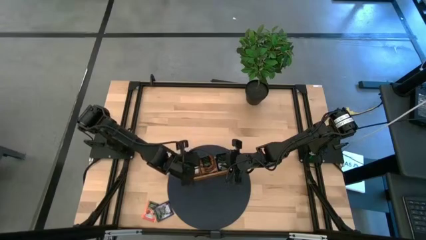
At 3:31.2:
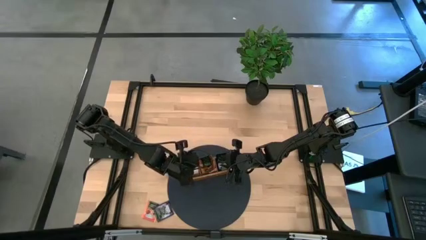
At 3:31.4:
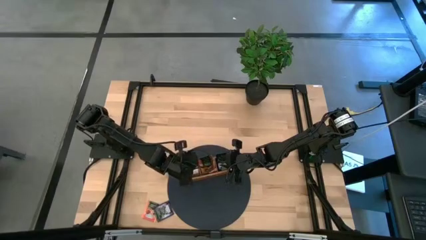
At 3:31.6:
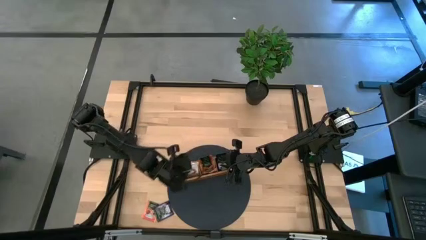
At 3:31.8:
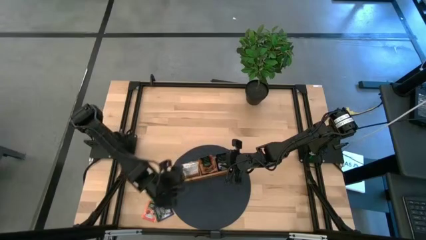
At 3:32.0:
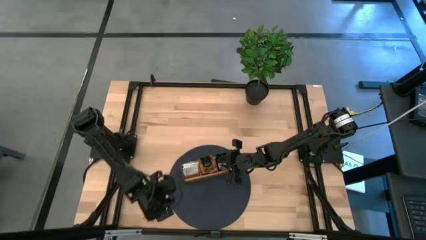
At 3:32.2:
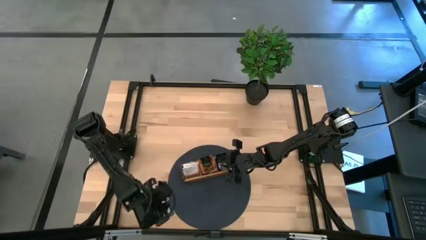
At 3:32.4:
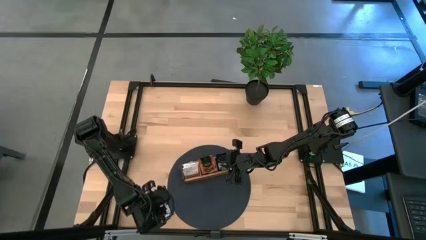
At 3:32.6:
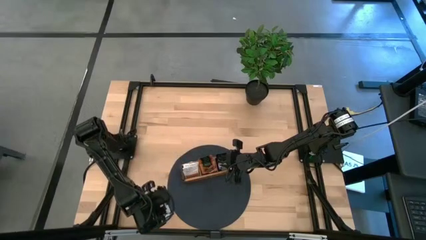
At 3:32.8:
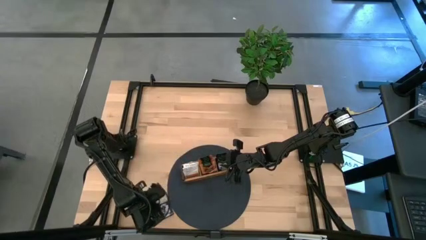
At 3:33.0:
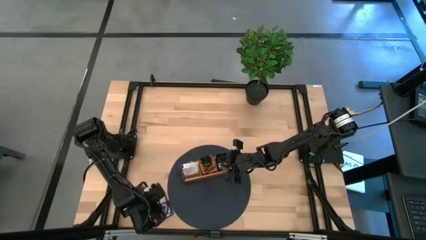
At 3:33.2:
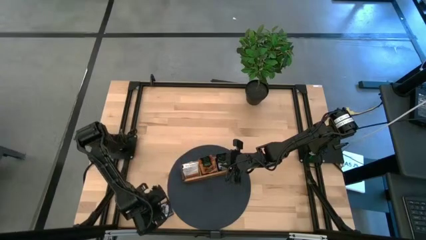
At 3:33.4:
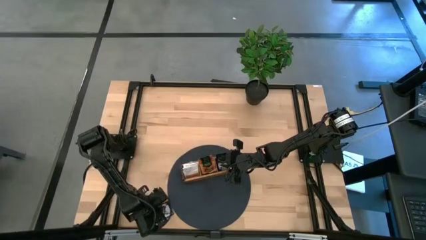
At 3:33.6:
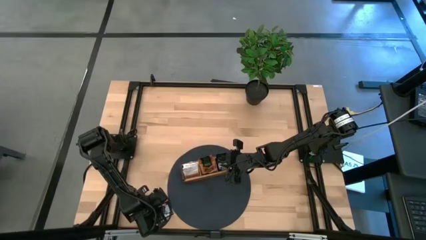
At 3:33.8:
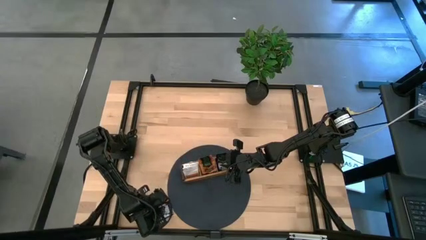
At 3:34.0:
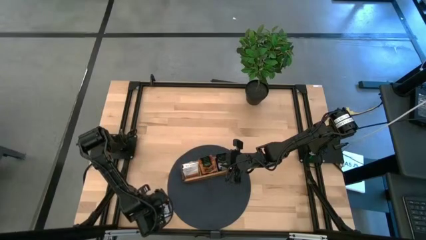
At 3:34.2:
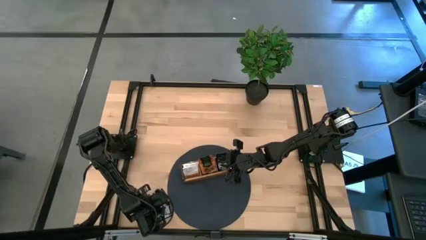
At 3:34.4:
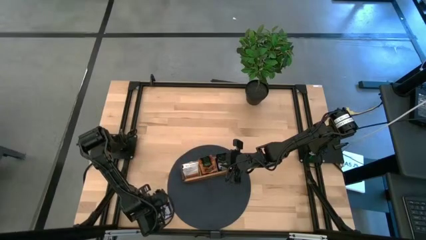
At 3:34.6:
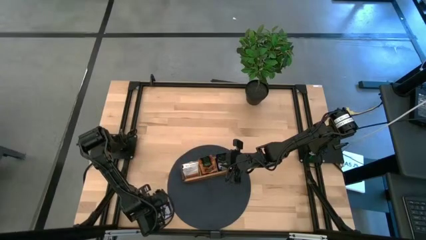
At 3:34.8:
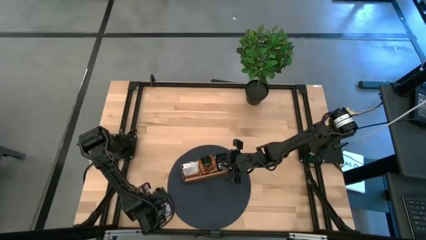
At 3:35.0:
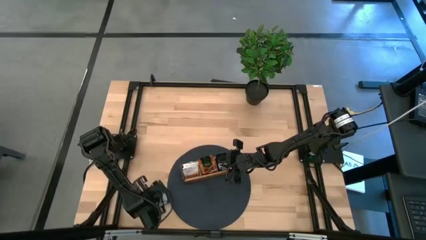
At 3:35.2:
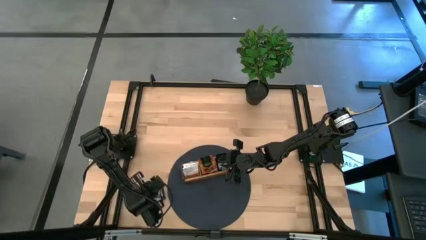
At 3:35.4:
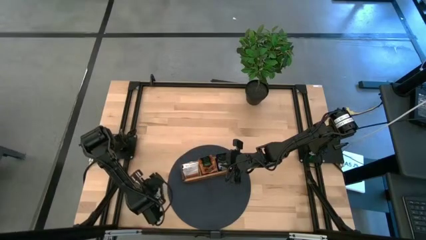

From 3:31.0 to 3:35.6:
Task: Pick & Place Tea
Put the black white tea bag into the right section of the wooden organizer

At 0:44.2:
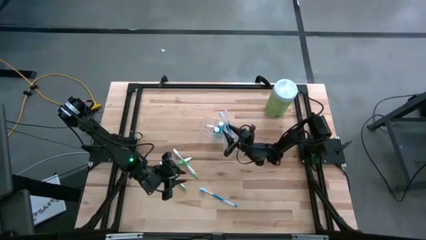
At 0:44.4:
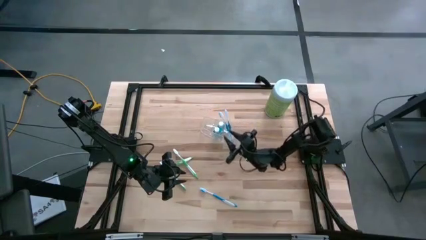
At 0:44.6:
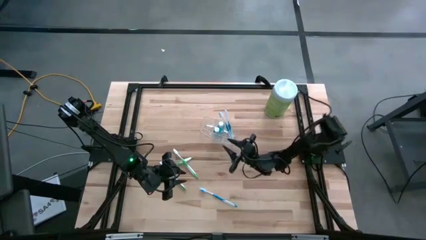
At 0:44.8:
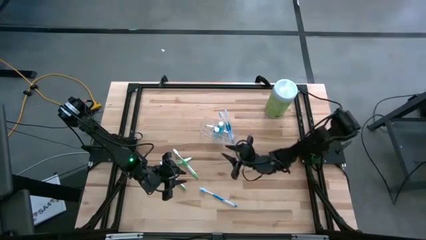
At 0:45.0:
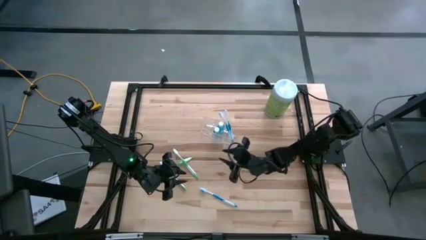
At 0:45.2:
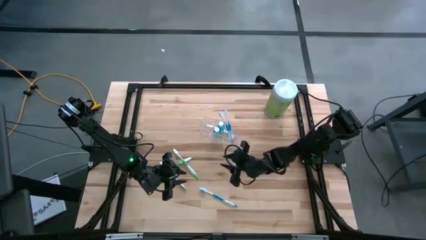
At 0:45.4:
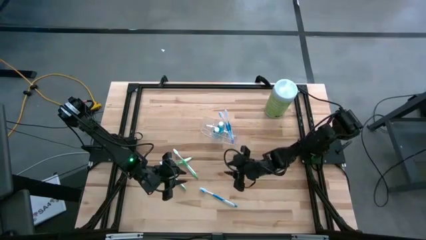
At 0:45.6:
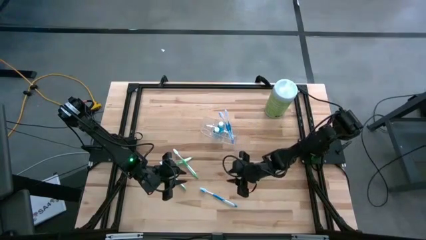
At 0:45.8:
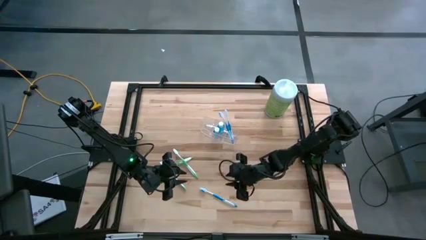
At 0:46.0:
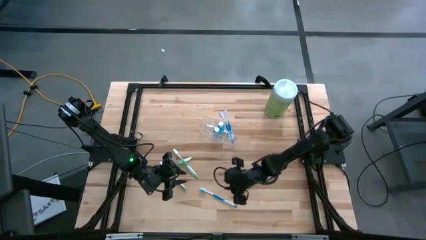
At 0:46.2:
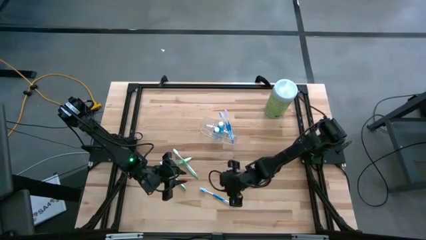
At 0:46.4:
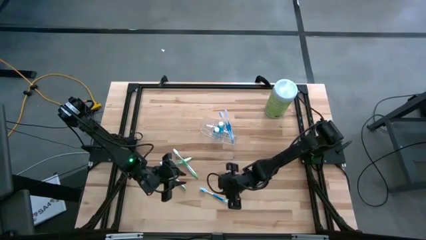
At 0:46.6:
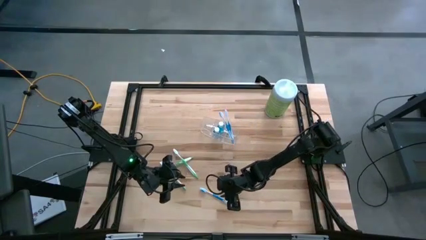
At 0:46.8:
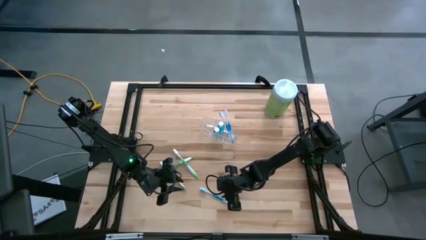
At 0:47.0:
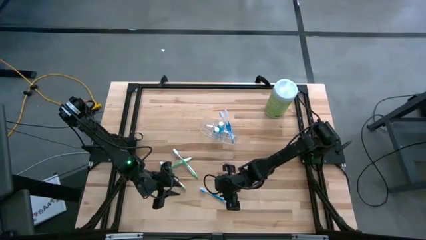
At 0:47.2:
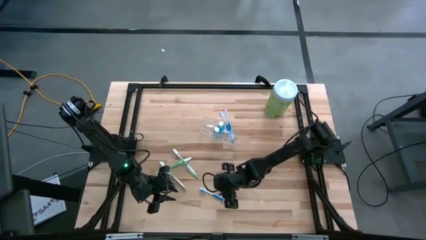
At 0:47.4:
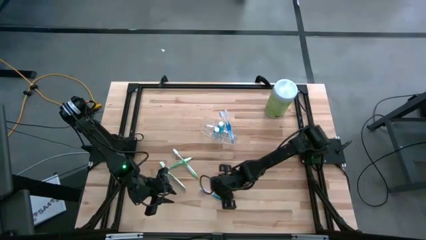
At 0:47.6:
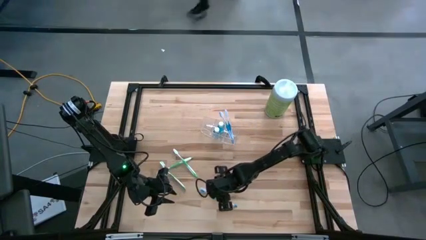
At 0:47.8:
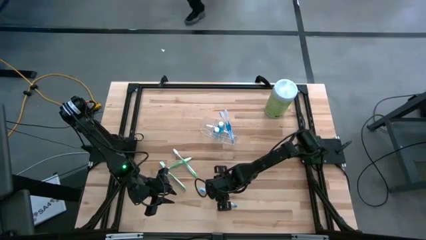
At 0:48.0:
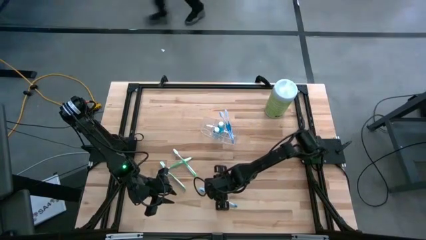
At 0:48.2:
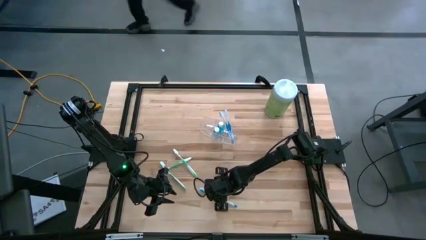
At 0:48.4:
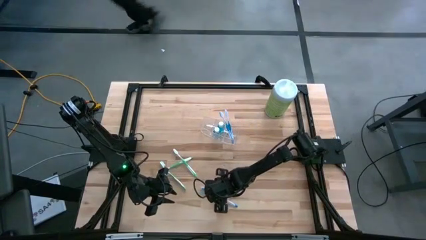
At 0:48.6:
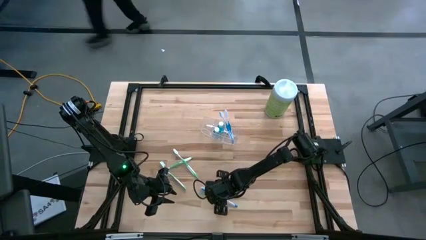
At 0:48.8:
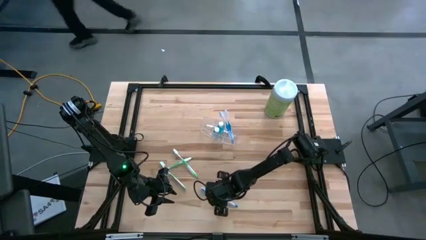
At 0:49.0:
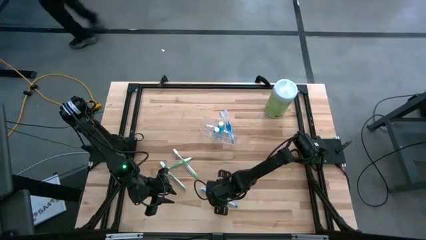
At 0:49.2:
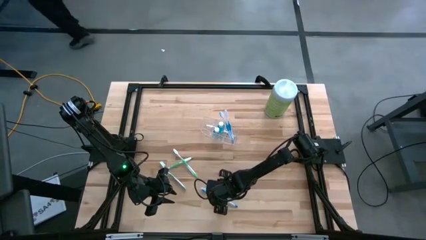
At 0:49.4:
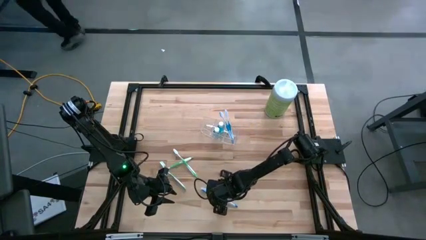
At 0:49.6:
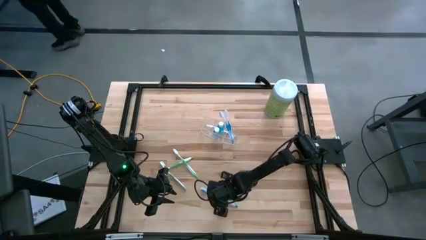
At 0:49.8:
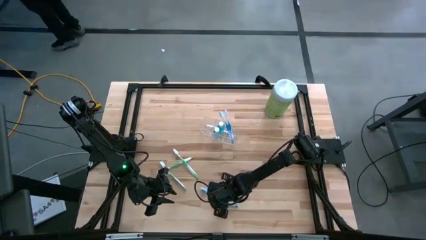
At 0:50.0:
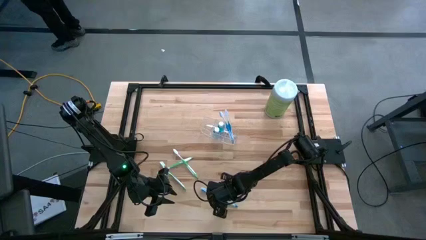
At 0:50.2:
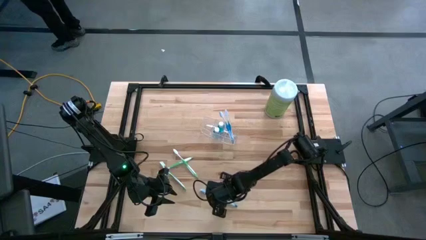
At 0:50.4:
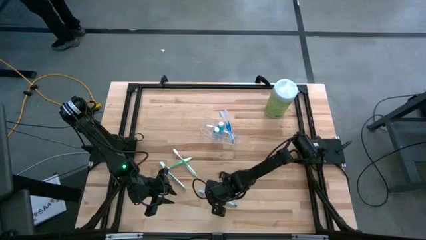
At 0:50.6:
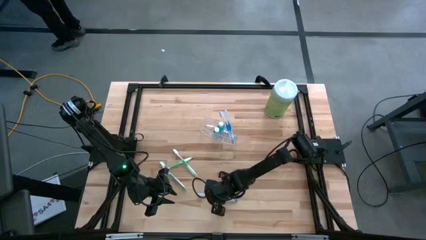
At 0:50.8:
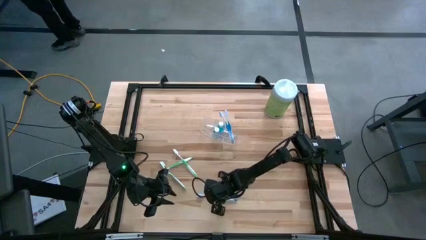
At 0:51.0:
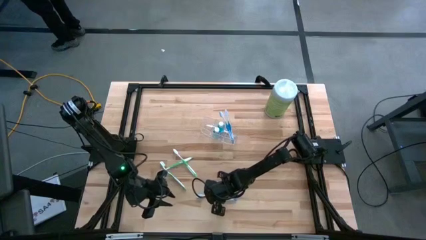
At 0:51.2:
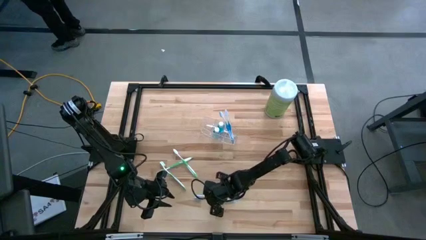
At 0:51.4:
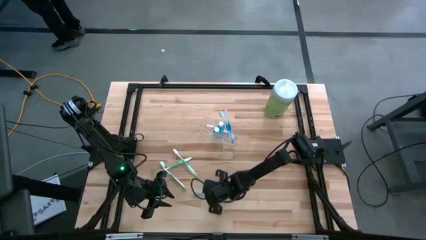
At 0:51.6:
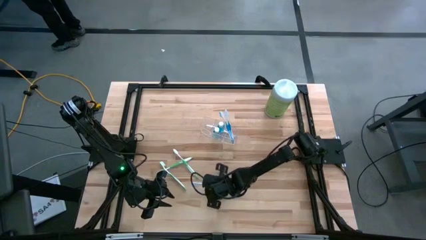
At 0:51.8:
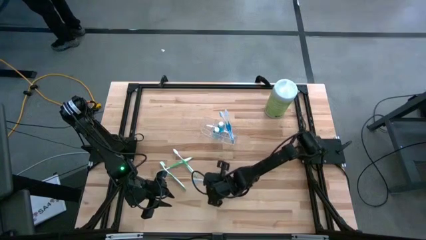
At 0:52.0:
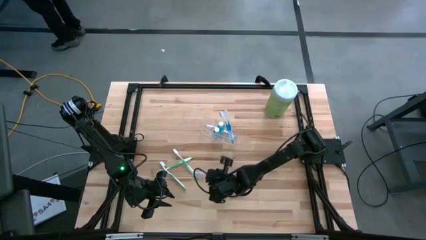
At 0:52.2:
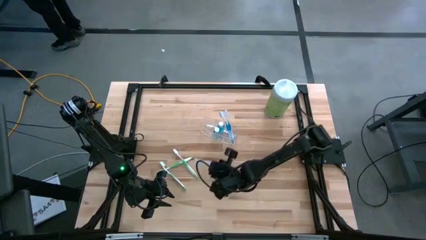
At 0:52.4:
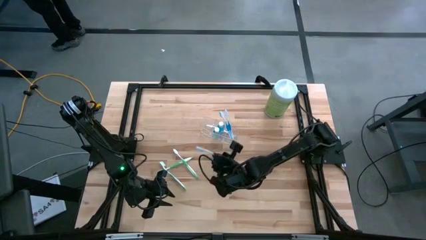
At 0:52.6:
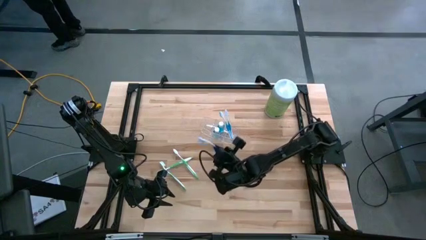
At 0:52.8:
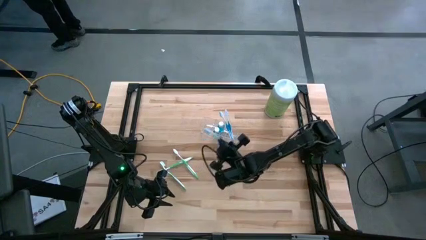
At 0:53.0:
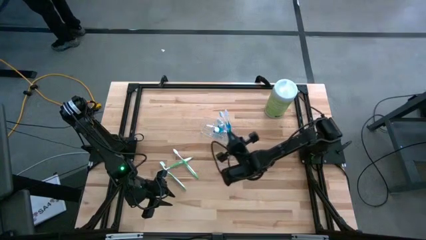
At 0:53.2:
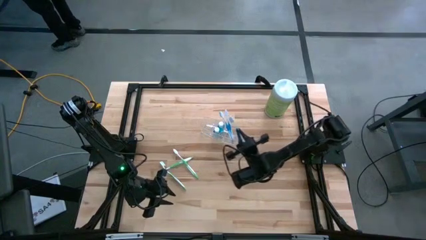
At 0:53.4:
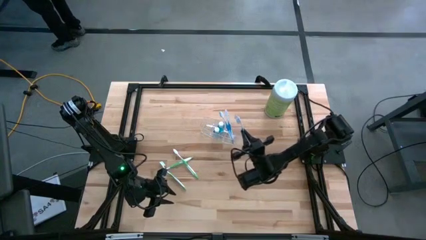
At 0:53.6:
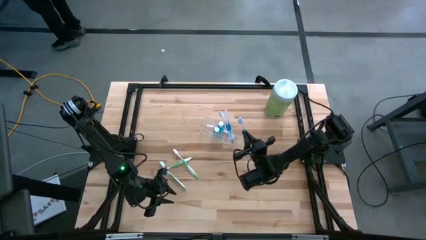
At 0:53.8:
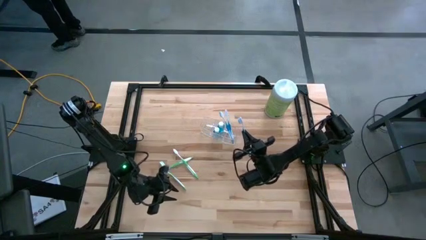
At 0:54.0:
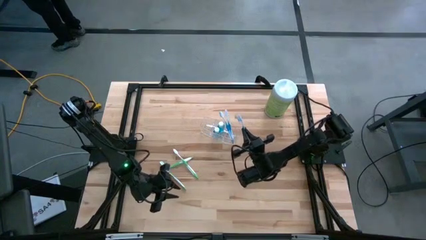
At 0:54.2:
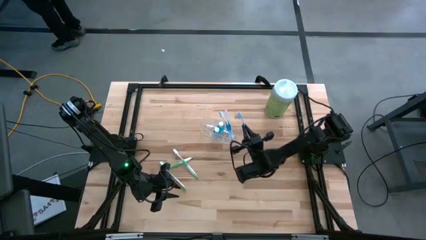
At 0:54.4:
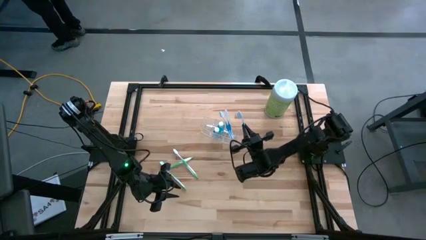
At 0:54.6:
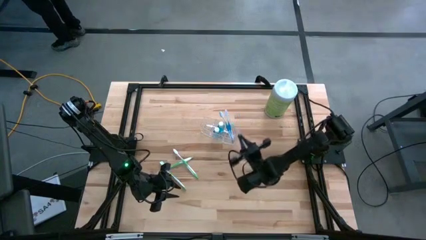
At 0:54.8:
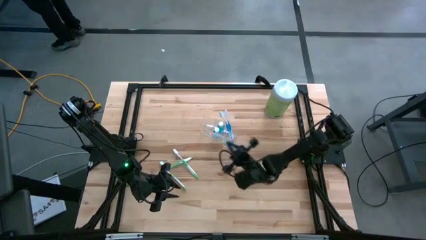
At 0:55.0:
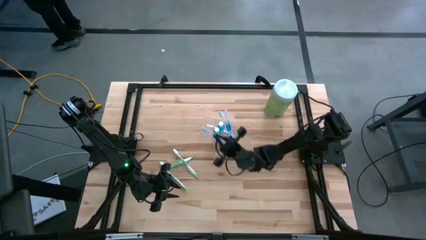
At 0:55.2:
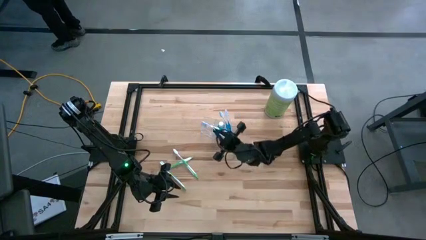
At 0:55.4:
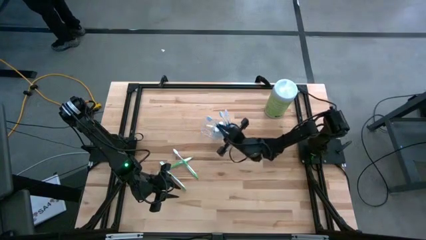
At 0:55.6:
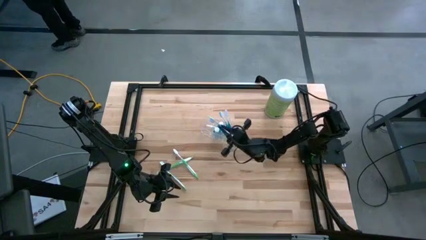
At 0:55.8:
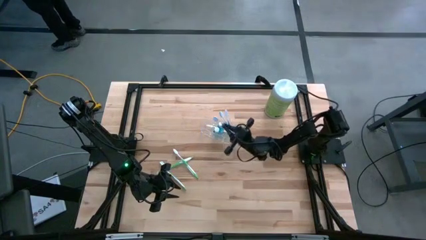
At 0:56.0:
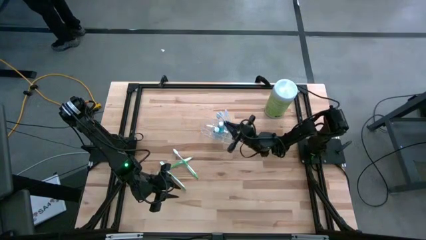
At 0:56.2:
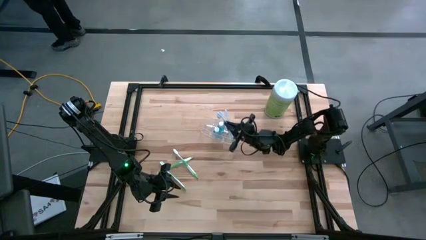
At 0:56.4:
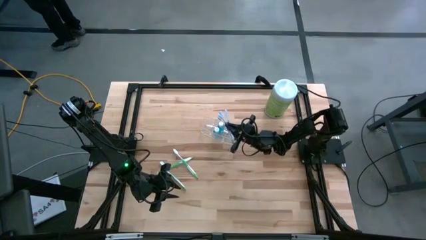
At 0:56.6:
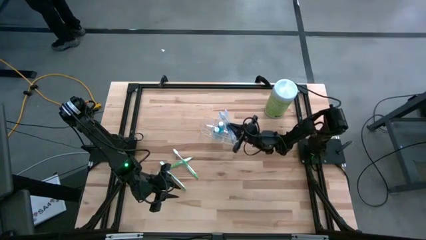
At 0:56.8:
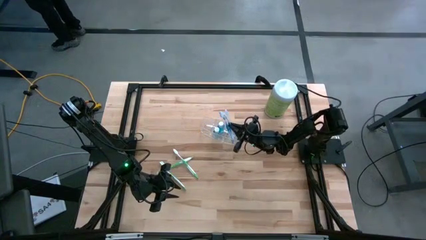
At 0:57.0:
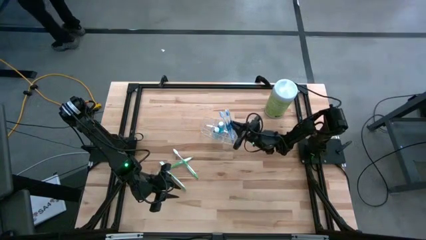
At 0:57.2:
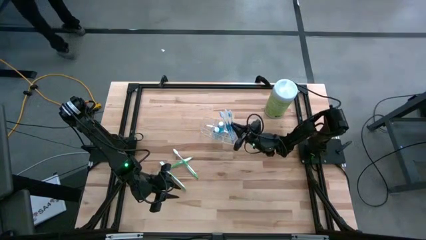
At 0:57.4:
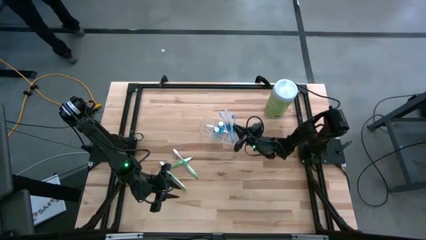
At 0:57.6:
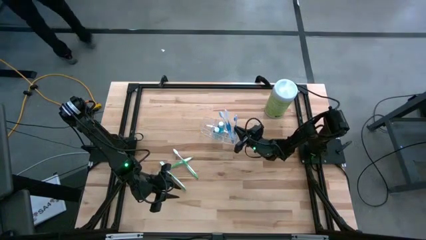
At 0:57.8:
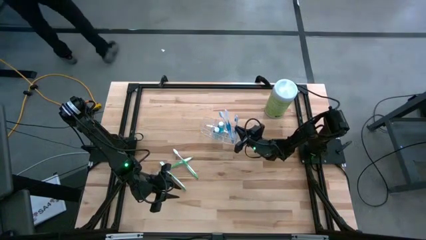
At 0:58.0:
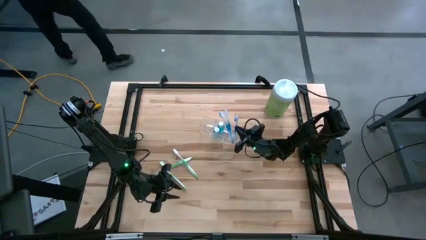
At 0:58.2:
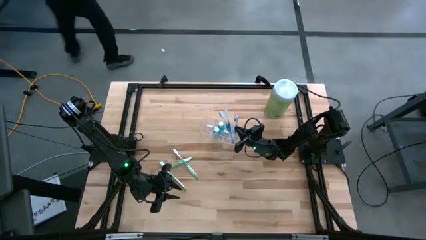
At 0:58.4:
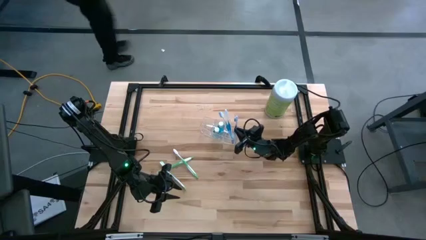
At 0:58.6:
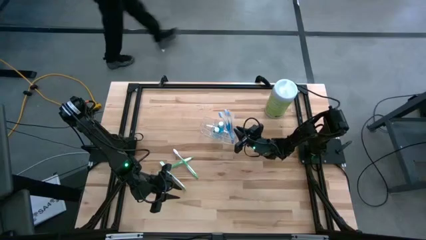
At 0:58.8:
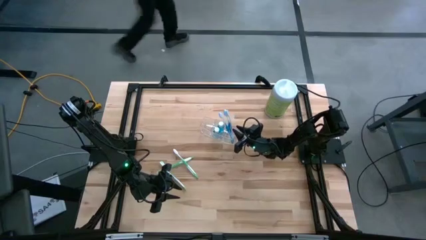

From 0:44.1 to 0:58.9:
Task: Pick & Place toothbrushing station
Put the blue toothbrush into the transparent organizer
